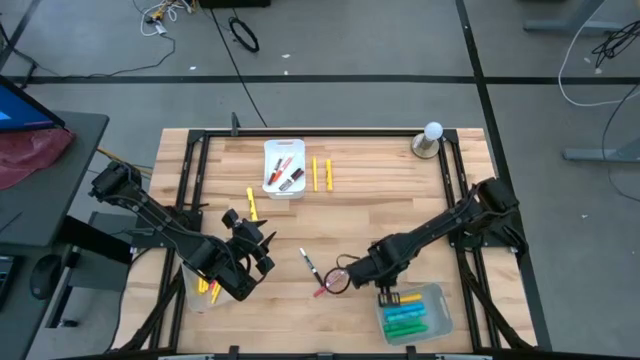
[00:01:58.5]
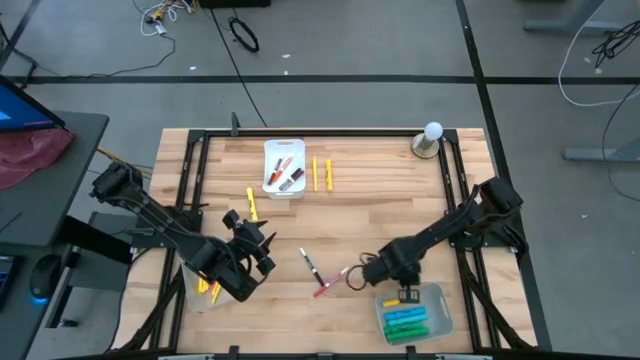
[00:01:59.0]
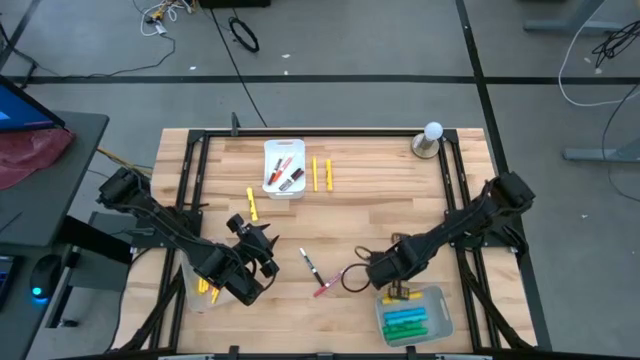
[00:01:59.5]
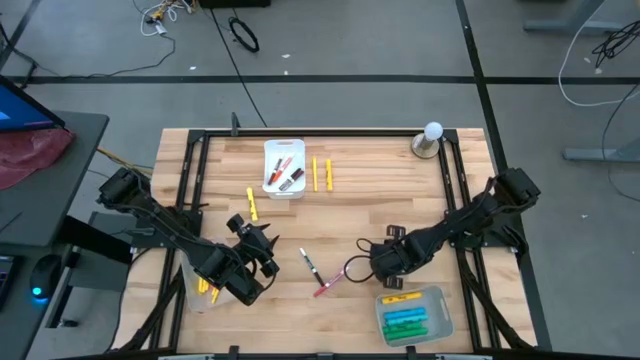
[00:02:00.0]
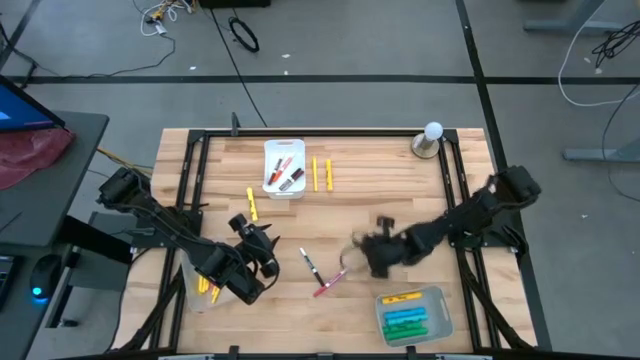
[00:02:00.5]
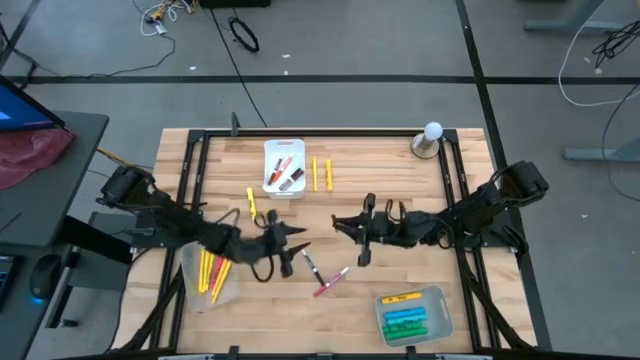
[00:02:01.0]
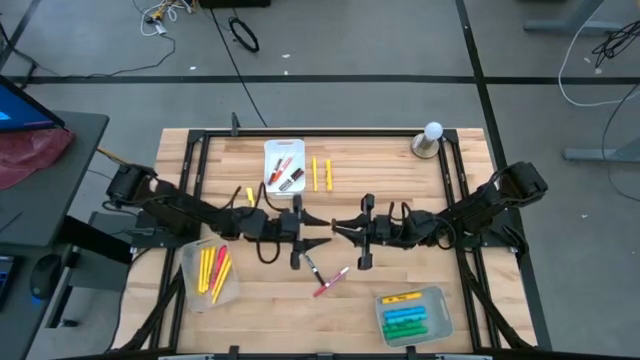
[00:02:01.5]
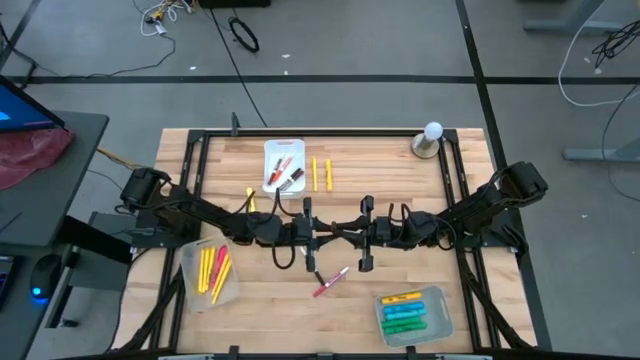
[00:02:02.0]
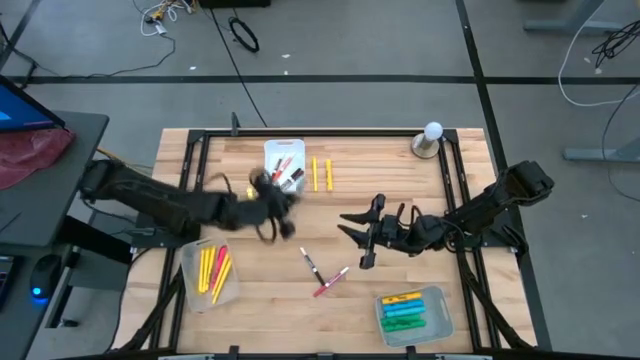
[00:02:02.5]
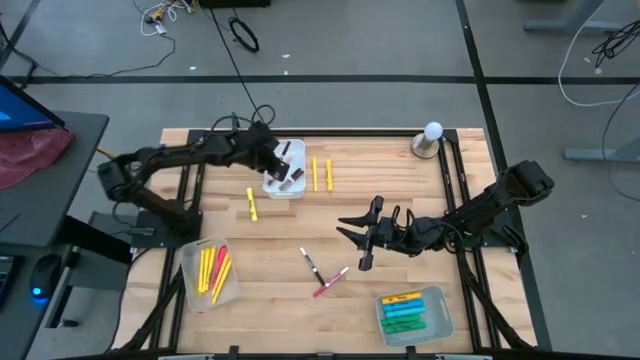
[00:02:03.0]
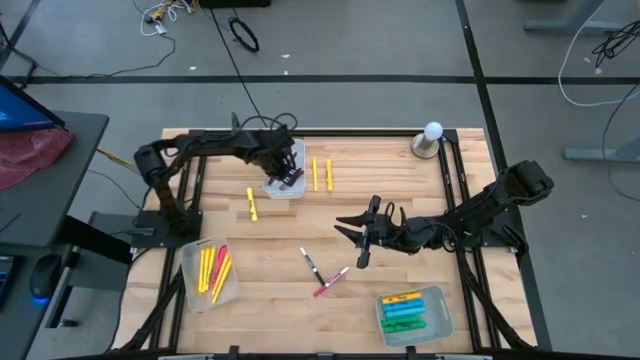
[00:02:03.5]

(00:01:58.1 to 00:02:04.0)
Task: Pick & Place Markers
Put the brown marker pen into the white bin

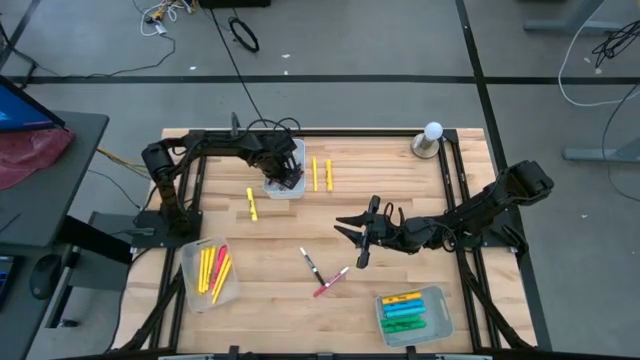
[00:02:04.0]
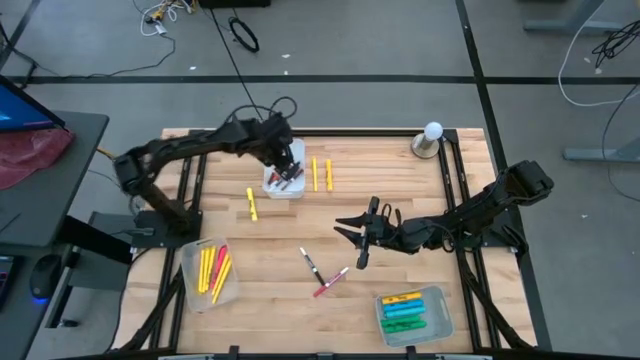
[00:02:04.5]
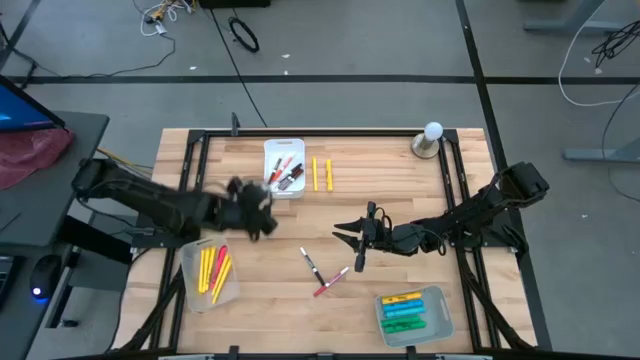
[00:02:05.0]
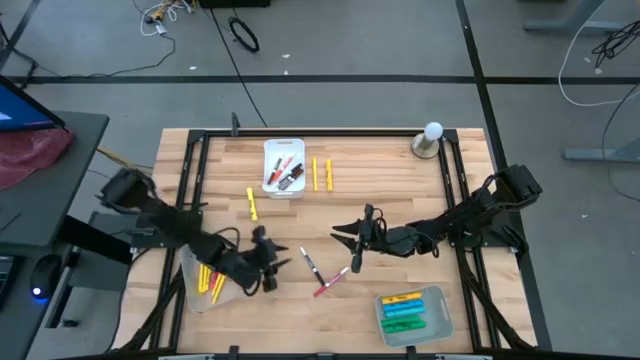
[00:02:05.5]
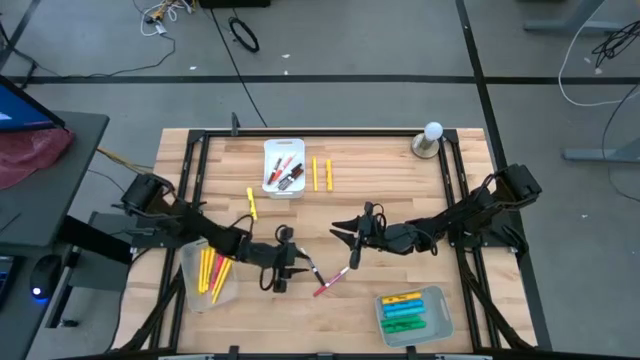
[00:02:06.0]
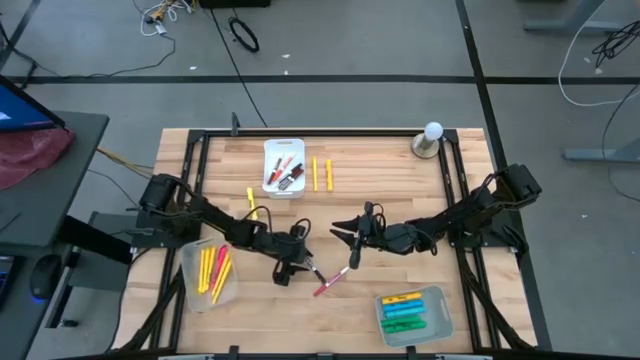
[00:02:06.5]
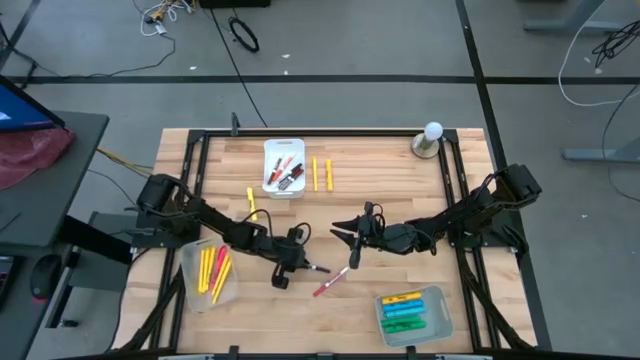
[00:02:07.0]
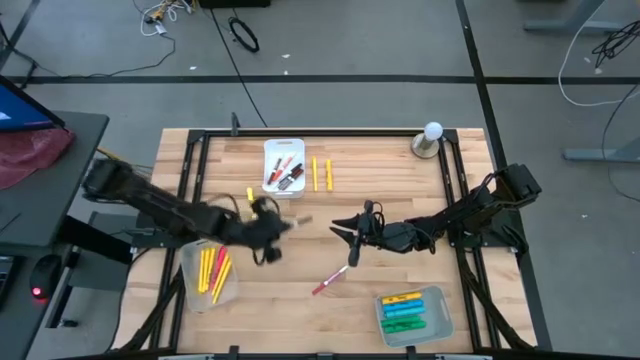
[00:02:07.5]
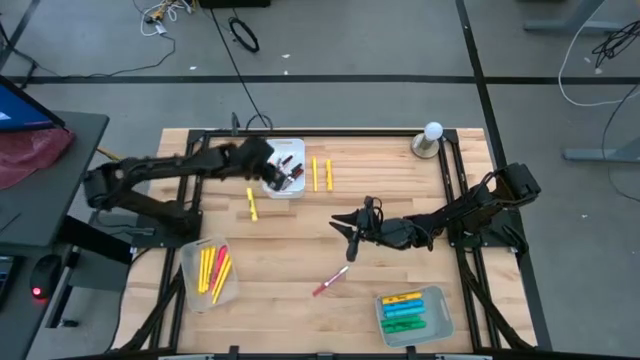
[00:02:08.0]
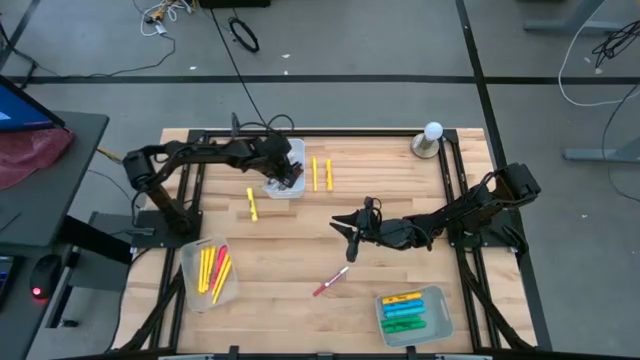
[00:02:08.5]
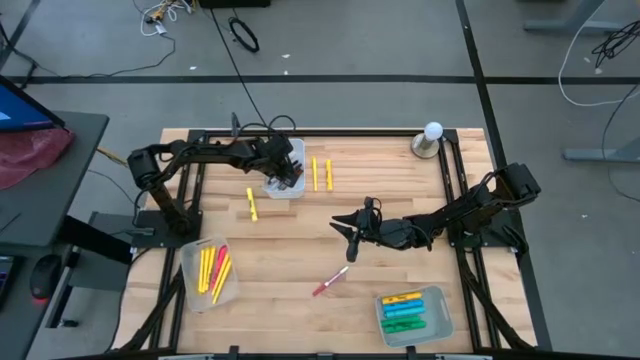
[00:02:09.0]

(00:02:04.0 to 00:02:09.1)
Put the black marker pen into the white bin

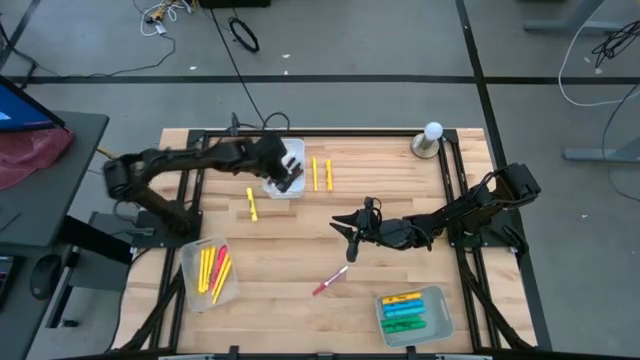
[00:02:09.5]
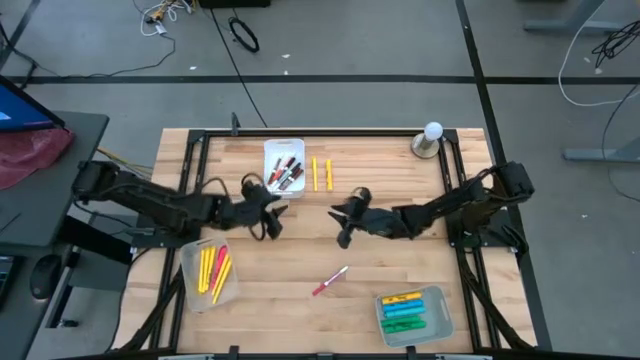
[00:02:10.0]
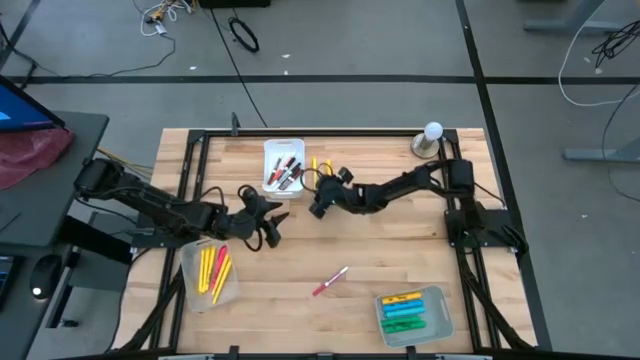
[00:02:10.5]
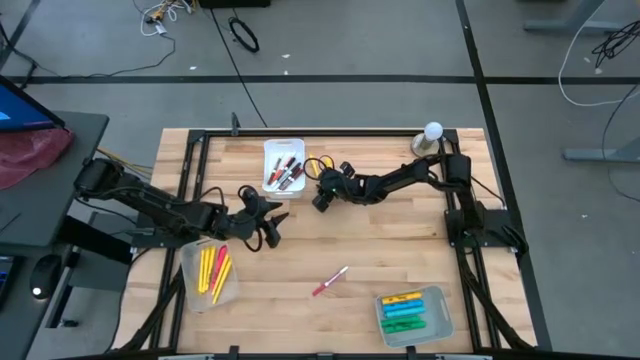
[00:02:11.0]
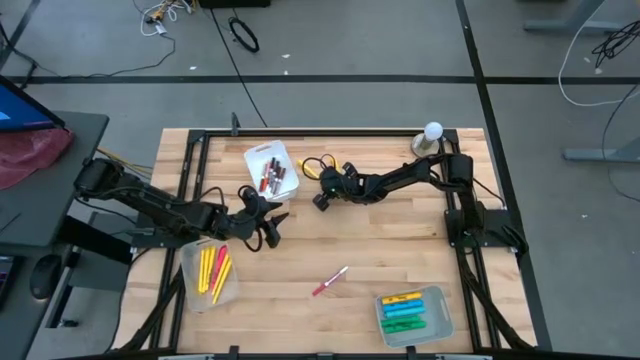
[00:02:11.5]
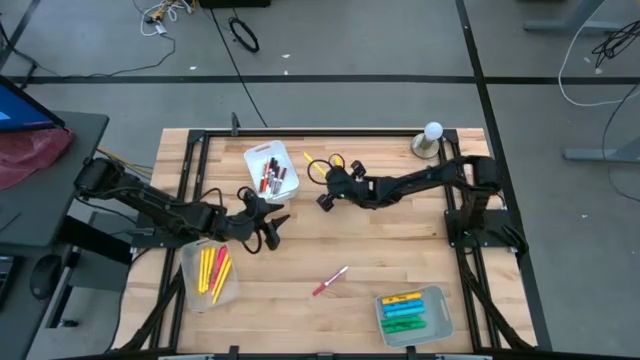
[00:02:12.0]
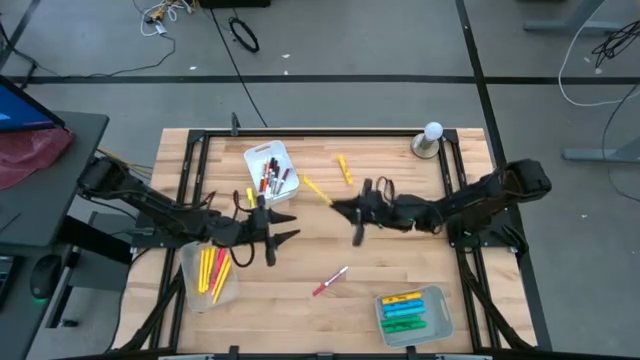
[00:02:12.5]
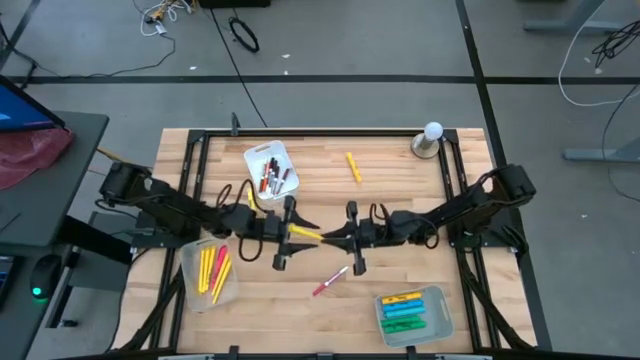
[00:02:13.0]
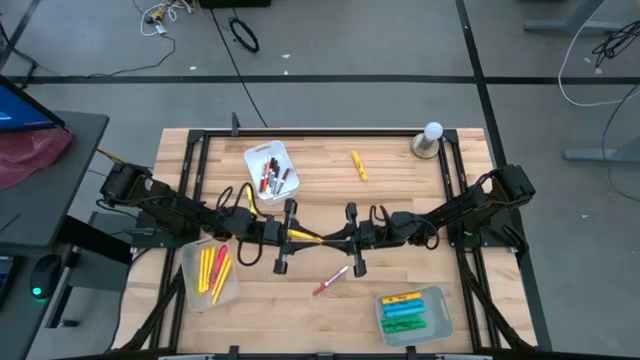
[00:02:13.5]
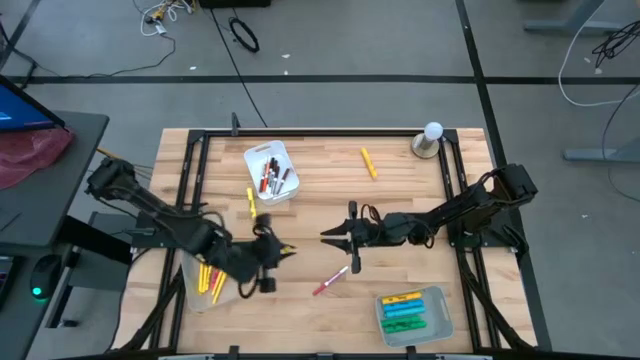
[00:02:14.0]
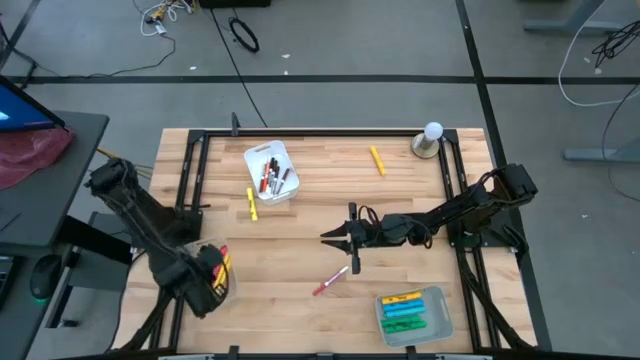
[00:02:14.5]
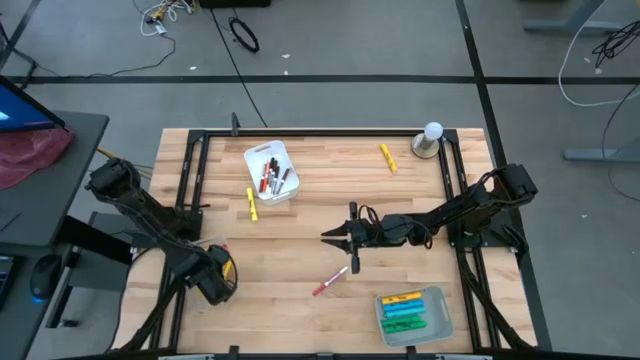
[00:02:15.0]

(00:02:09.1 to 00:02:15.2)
Put the yellow pen into the transparent bin

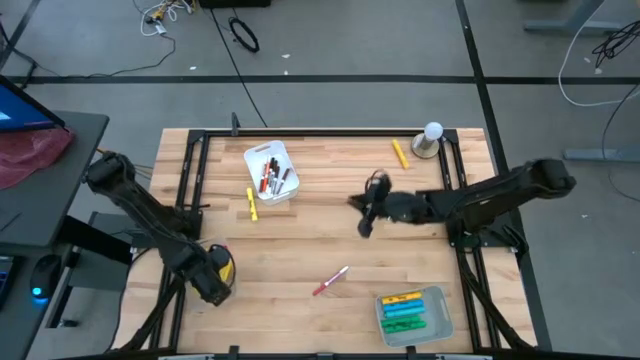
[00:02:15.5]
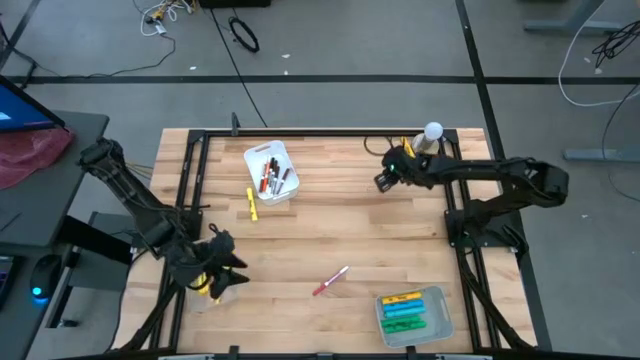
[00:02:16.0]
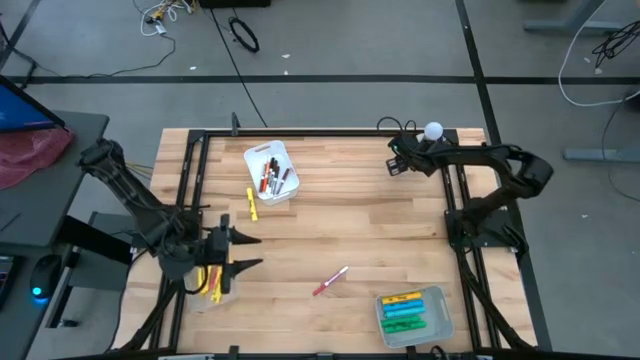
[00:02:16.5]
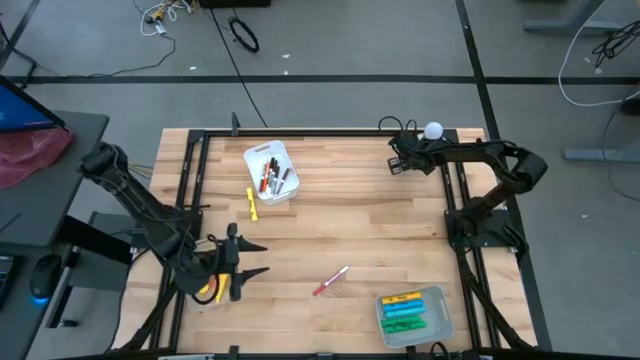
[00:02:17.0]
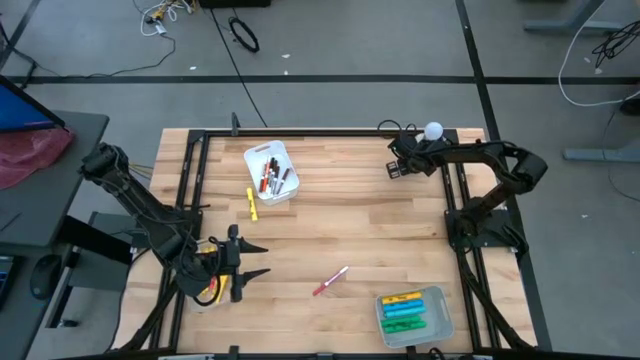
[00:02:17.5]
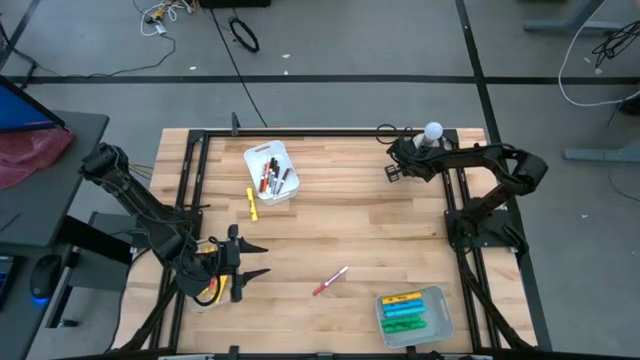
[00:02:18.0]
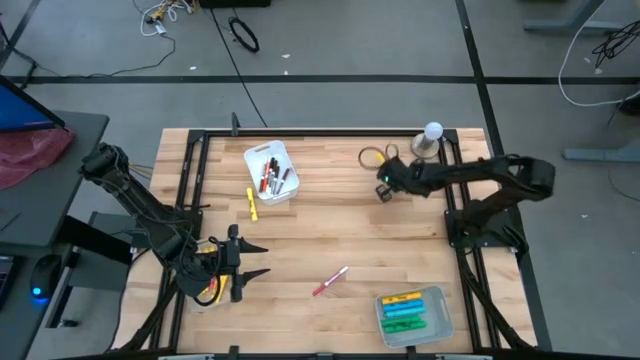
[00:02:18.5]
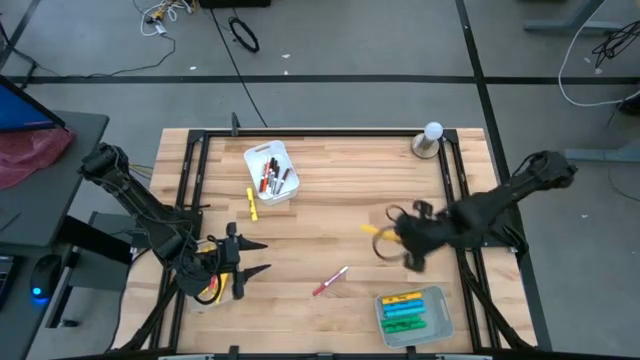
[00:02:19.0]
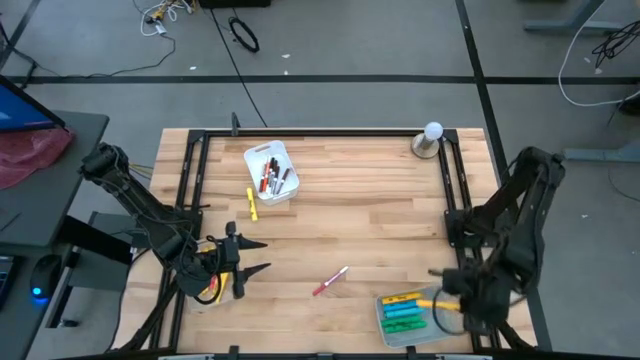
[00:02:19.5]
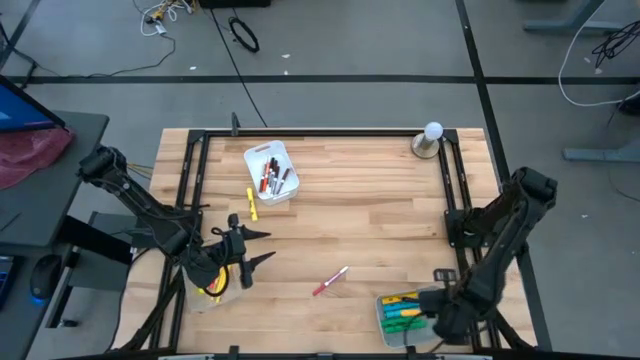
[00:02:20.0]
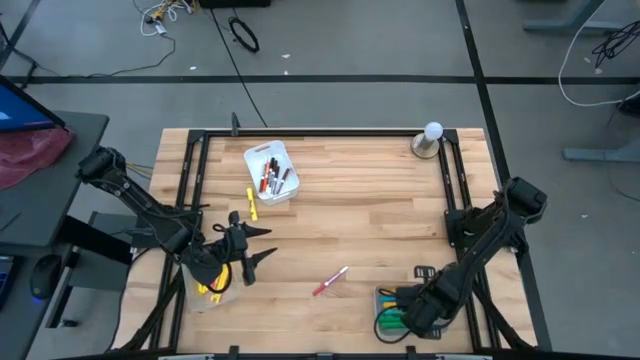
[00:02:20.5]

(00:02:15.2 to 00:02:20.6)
Put the yellow highlighter into the gray bin
